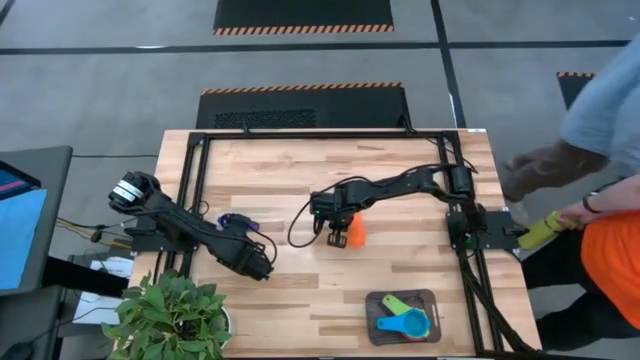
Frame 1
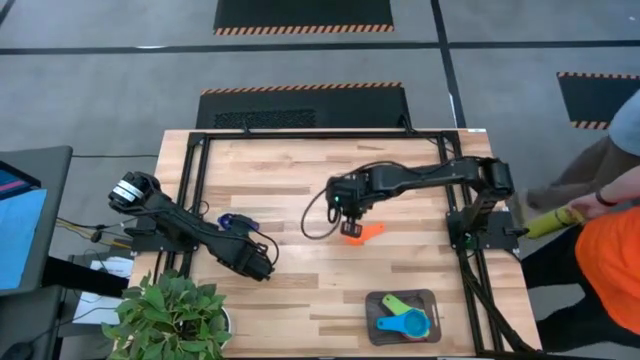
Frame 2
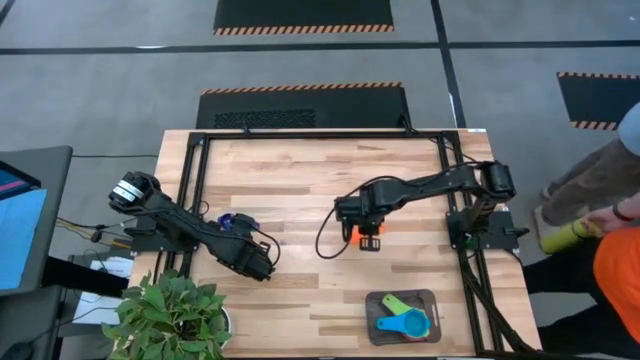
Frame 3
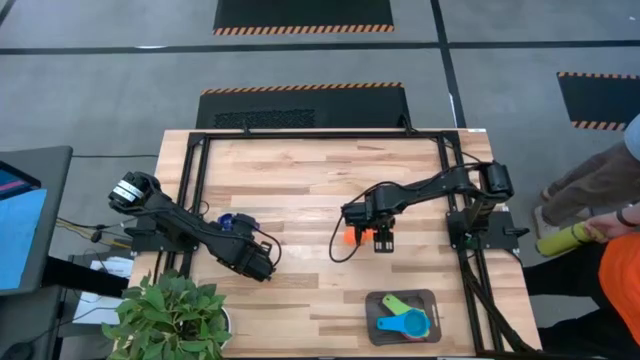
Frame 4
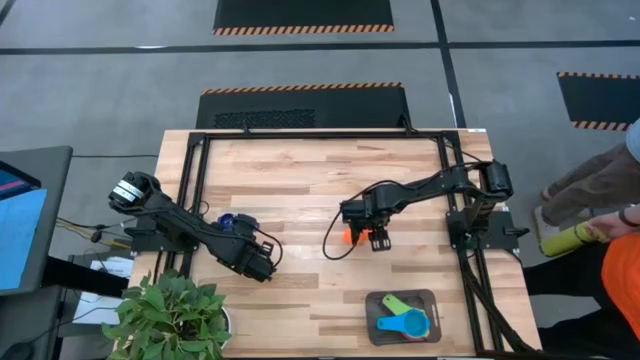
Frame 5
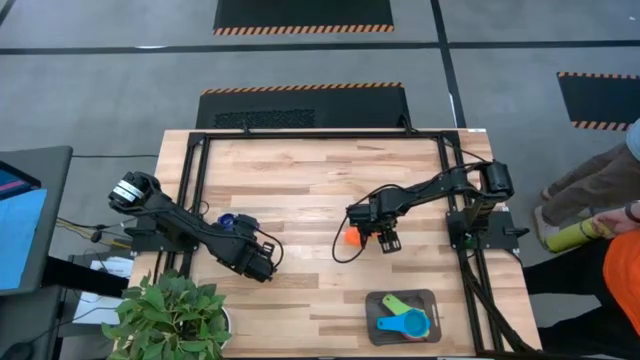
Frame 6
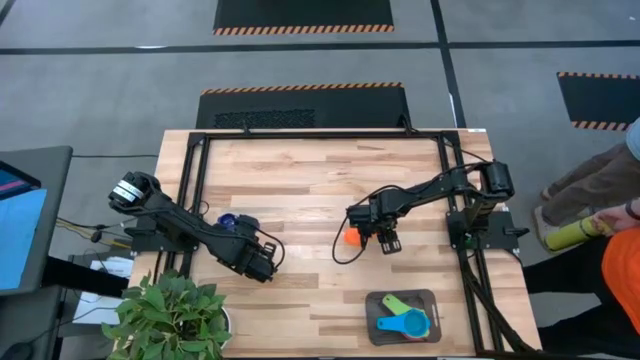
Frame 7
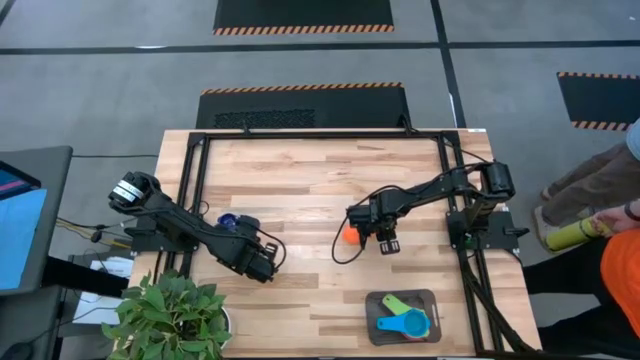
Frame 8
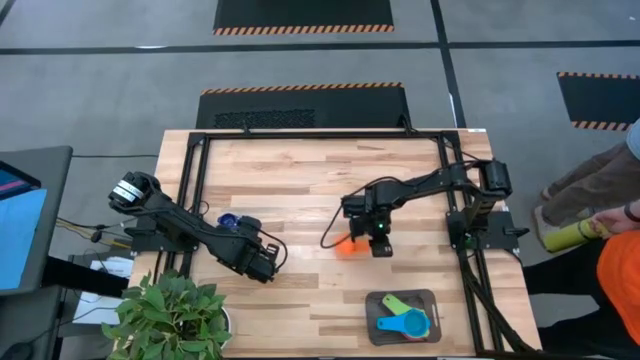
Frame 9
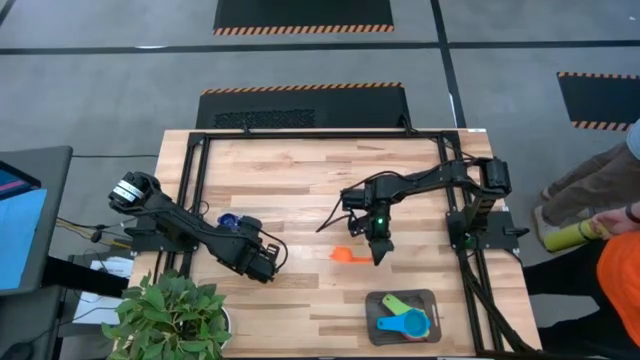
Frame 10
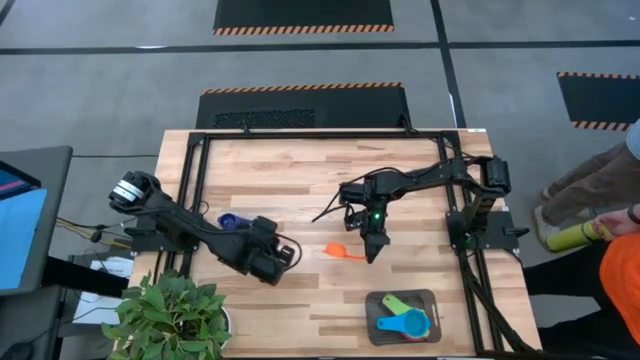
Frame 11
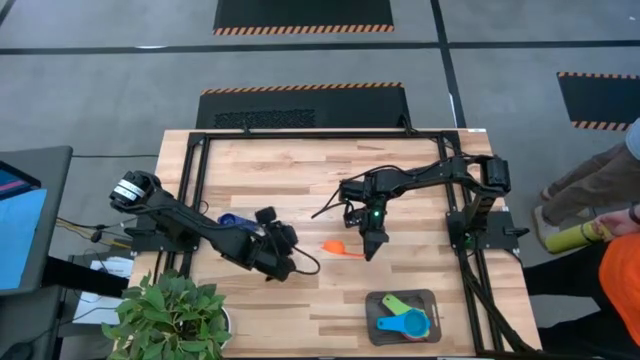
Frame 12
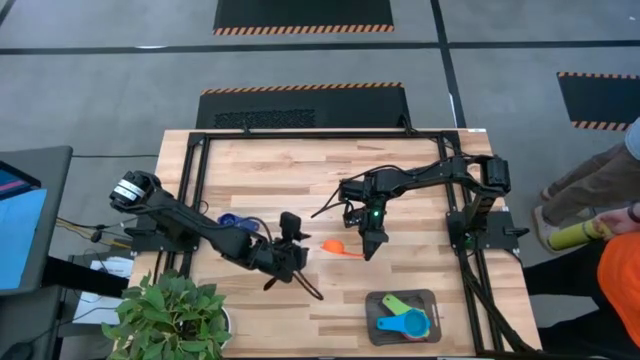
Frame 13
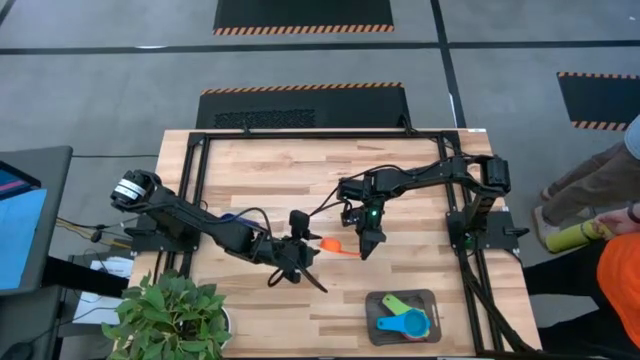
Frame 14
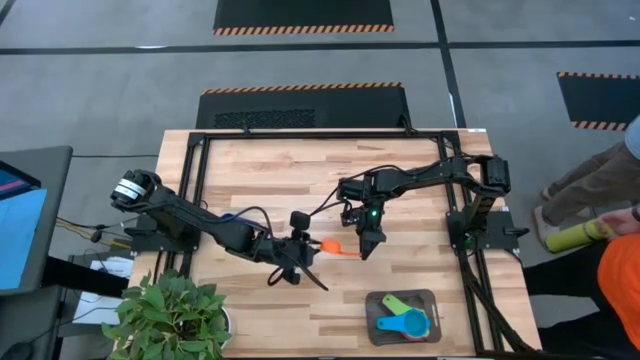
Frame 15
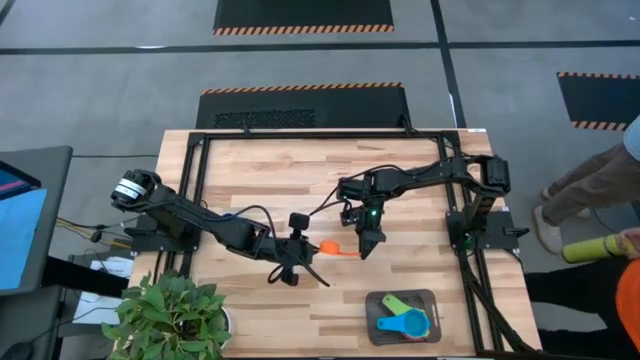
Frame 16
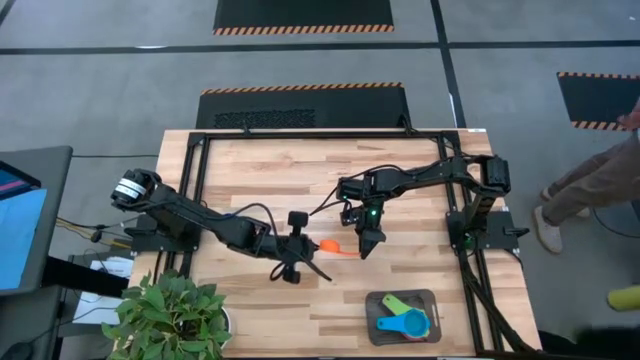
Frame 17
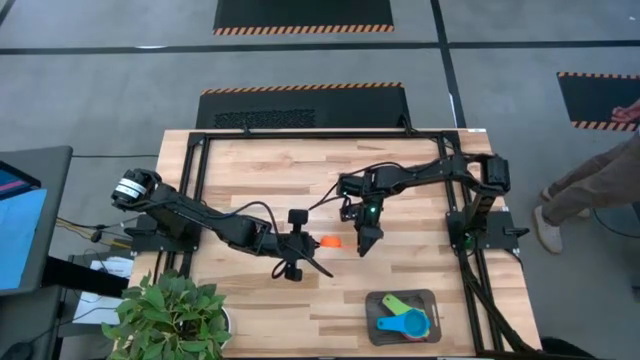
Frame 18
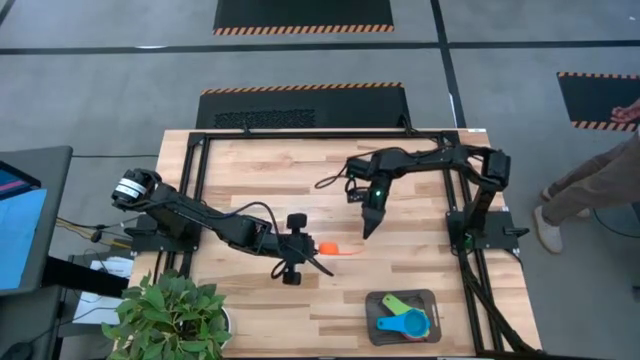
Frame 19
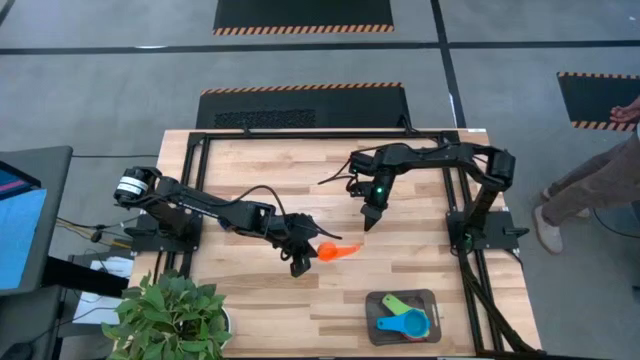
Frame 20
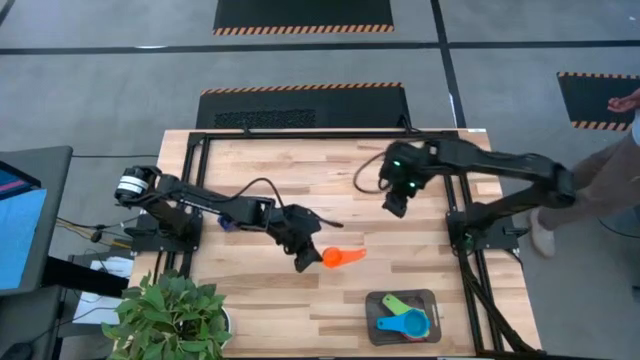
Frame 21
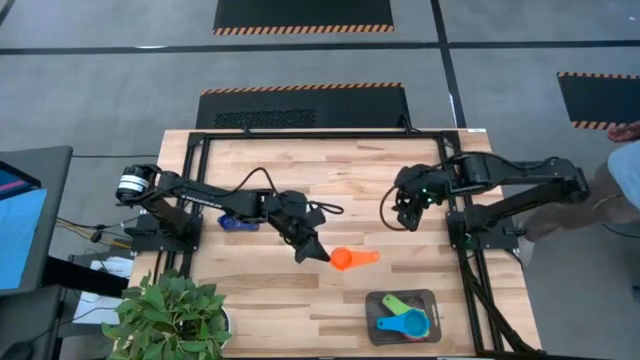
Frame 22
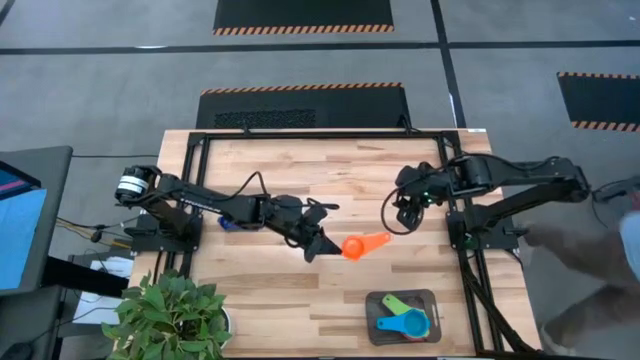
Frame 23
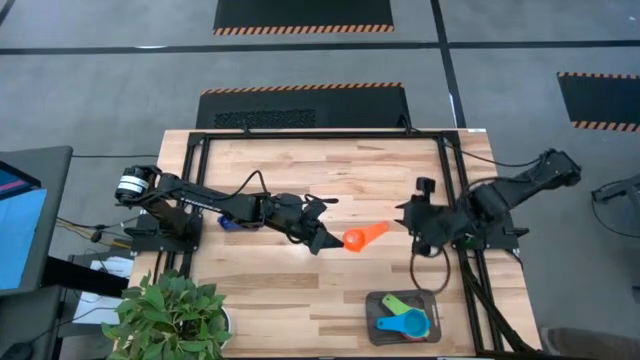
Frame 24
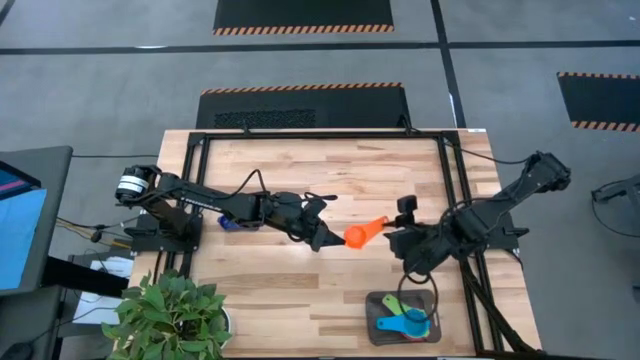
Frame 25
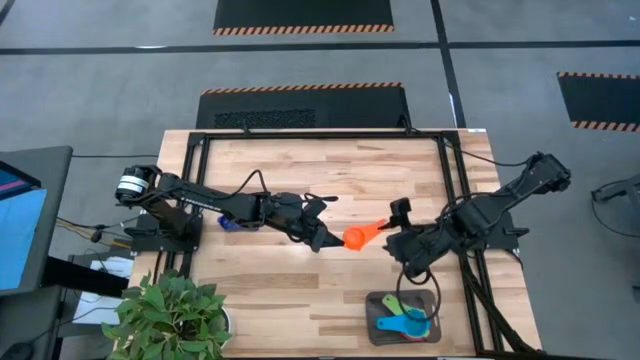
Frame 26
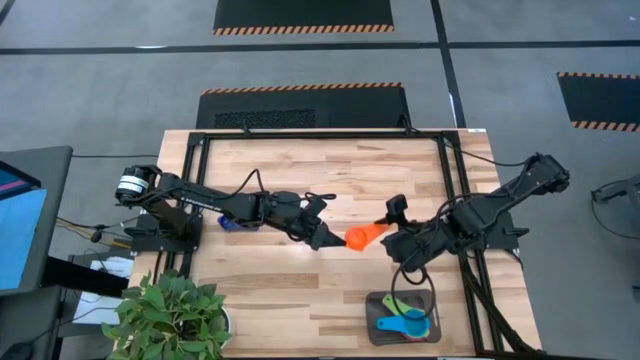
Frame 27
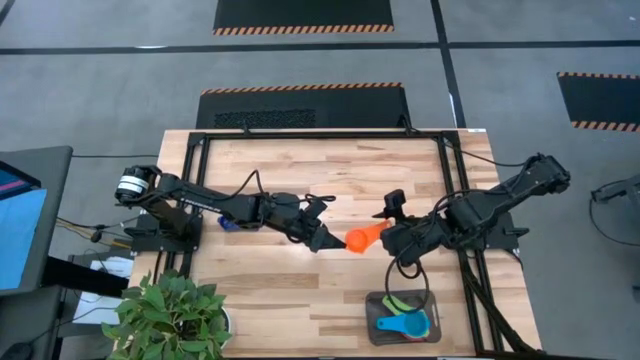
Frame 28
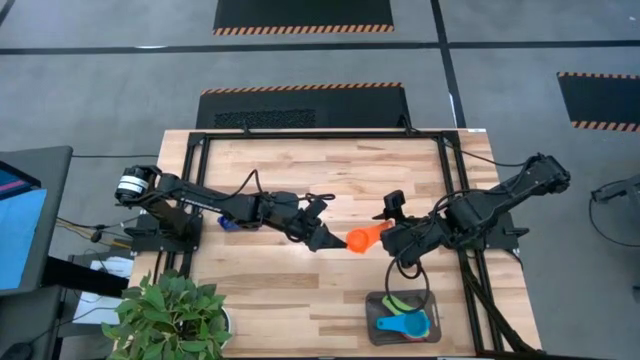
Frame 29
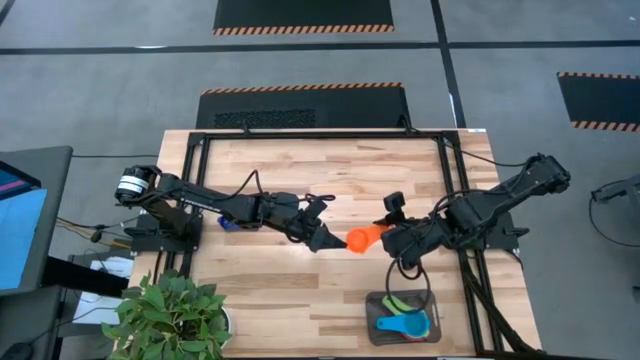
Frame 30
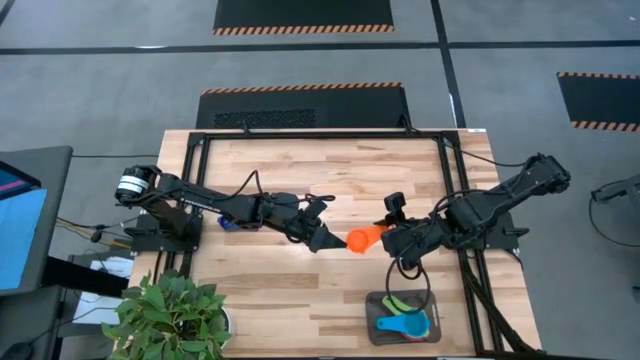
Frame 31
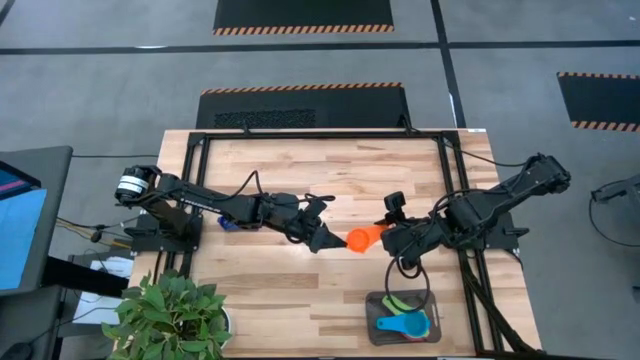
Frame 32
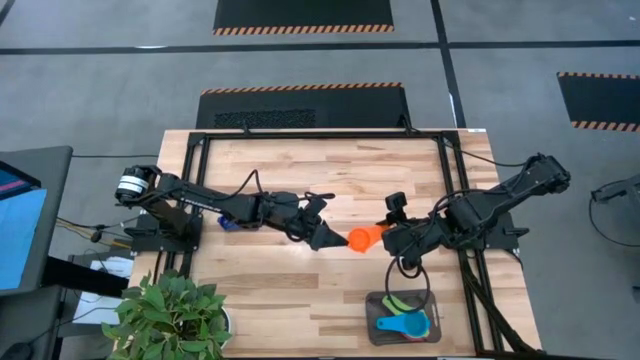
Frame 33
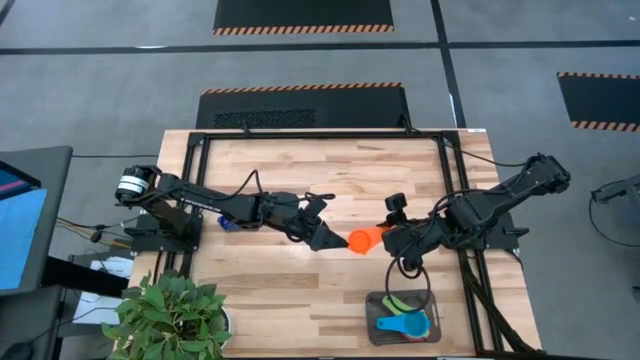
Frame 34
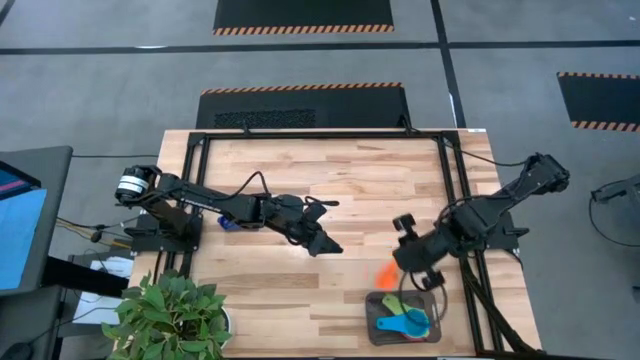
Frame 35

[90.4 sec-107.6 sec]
Task: Nest measuring cups in basket
Stack the orange measuring cup on top of the light blue measuring cup in the black bin

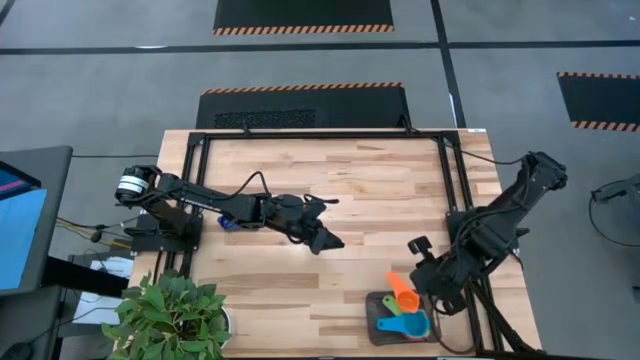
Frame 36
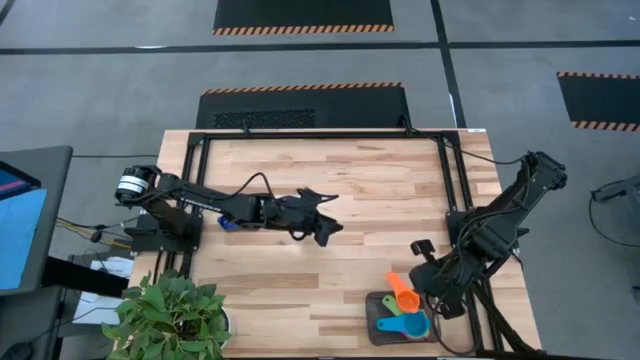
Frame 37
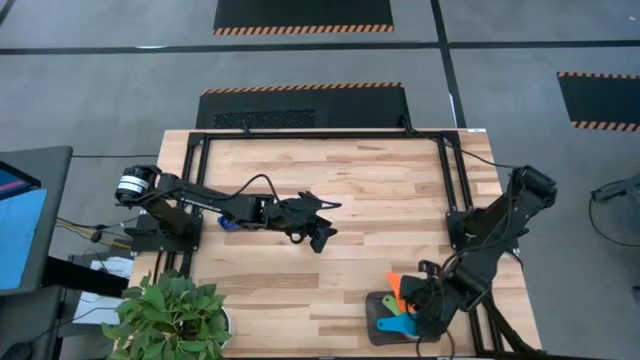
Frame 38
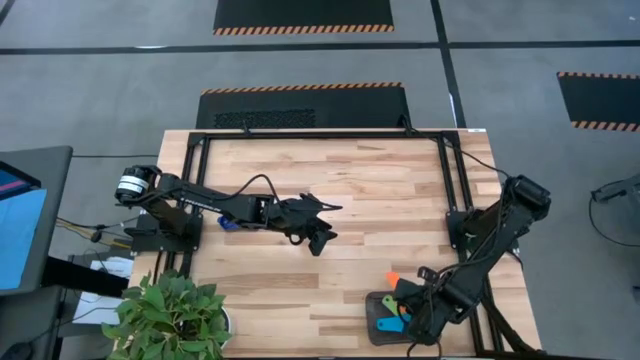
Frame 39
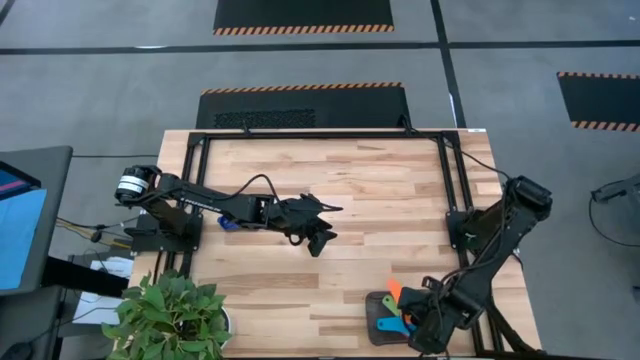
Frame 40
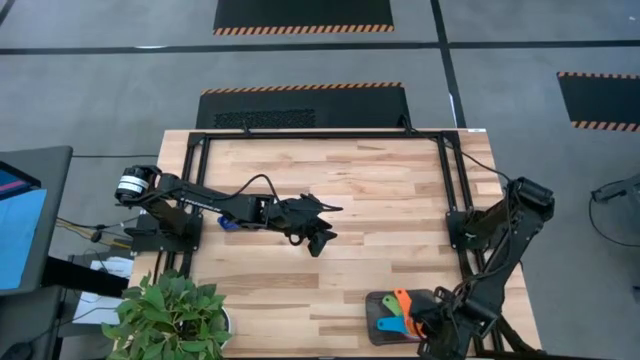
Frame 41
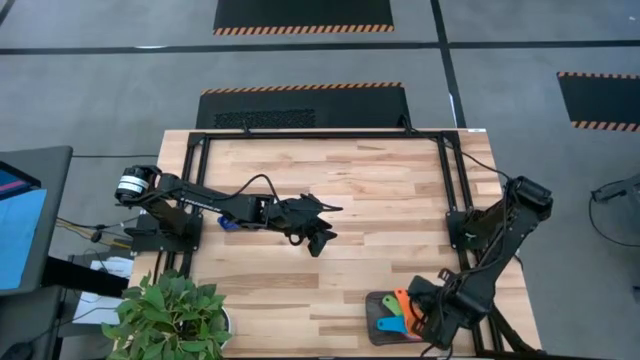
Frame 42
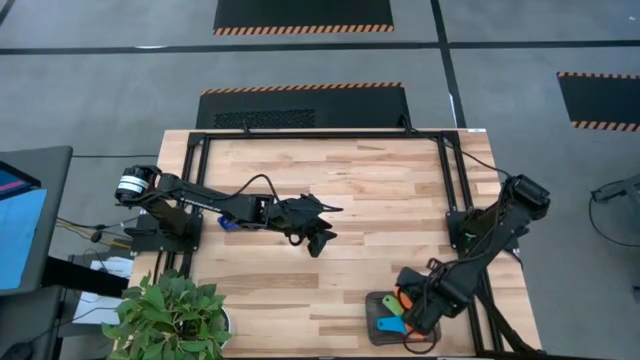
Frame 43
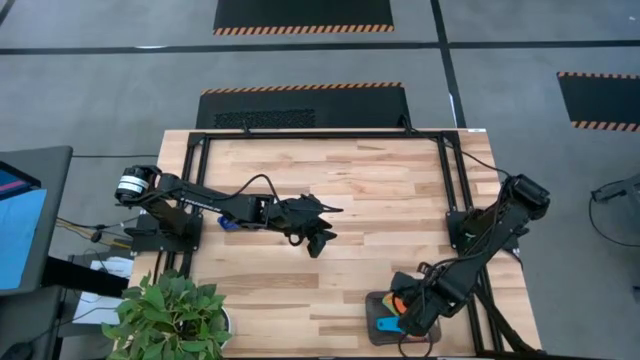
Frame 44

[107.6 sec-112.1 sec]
Stack the orange measuring cup on top of the light blue measuring cup in the black bin

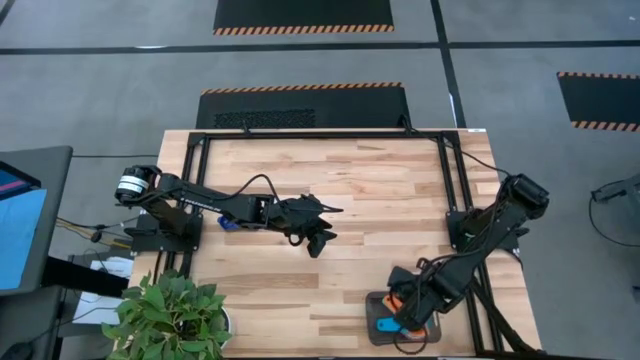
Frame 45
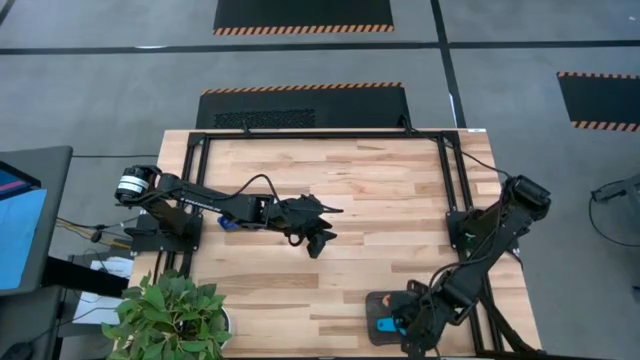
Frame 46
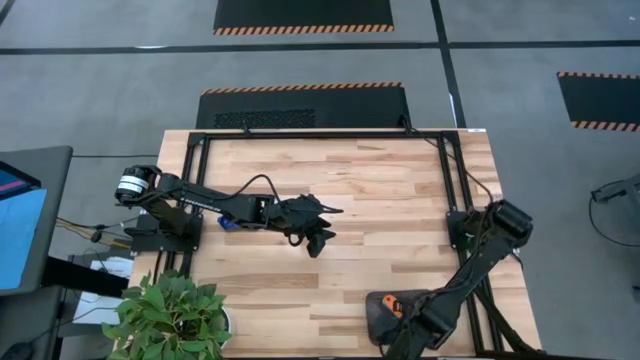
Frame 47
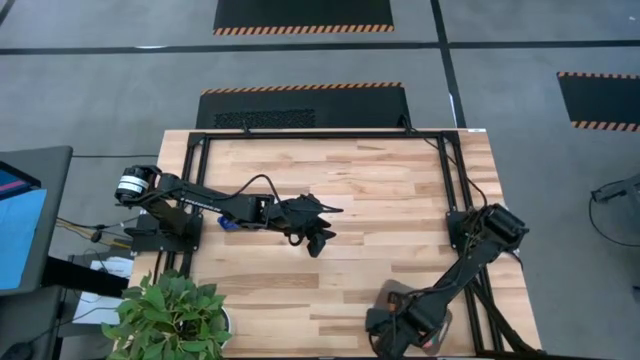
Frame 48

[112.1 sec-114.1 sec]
Adjust the stacked measuring cups in the black bin
